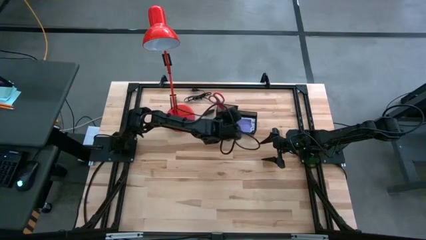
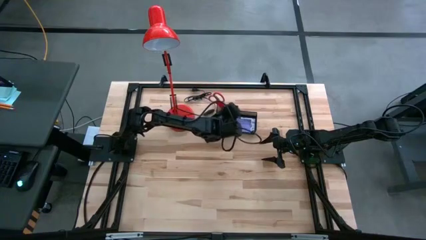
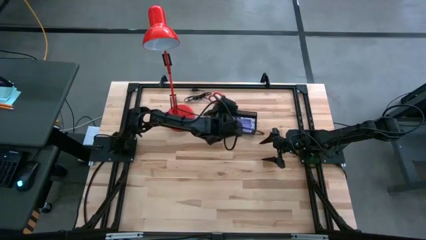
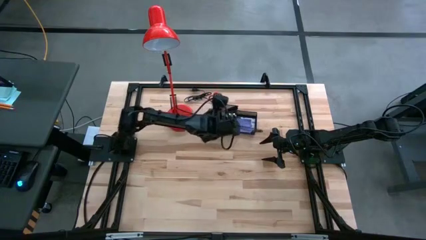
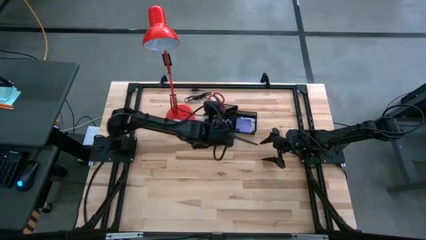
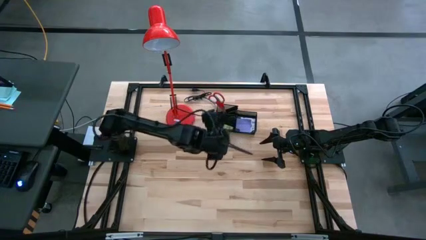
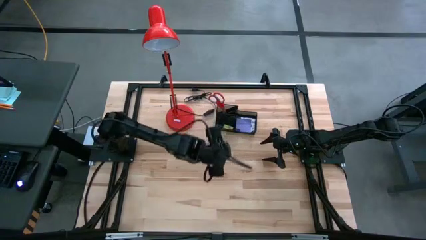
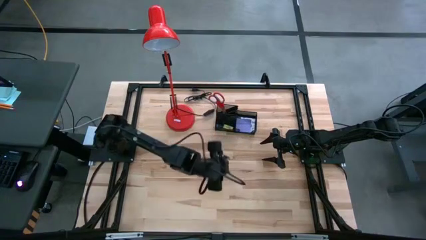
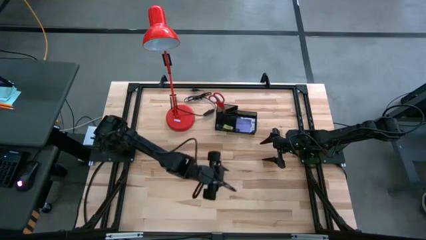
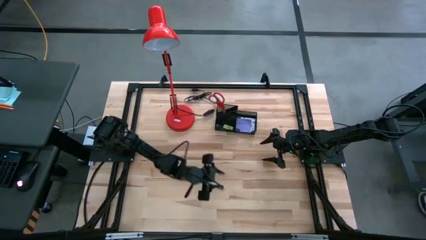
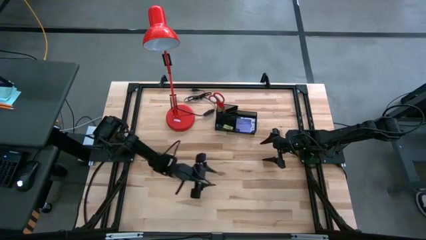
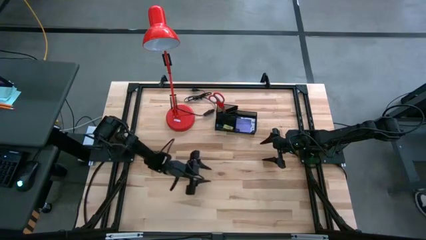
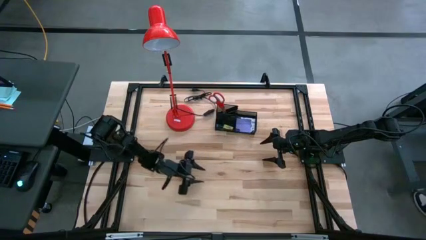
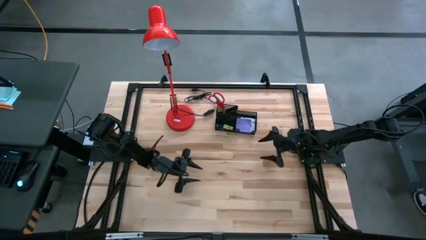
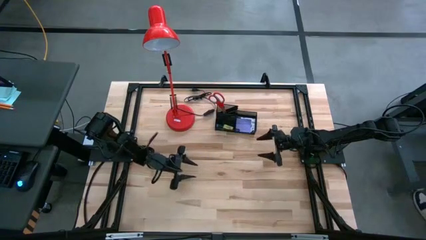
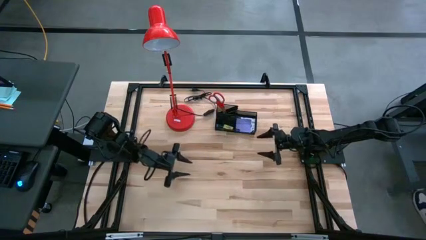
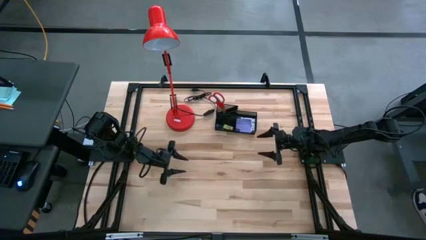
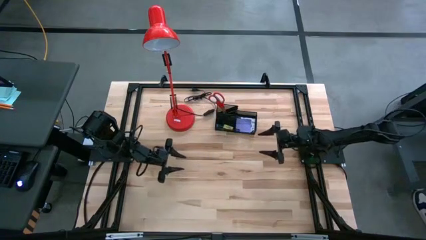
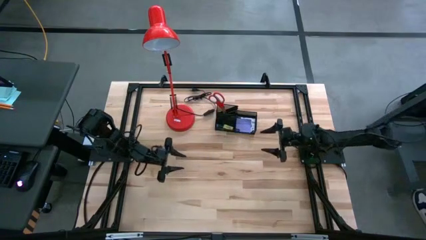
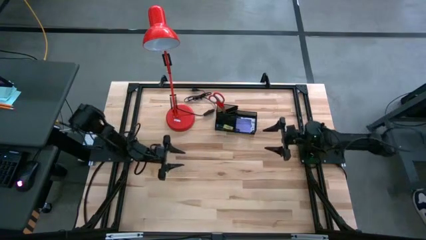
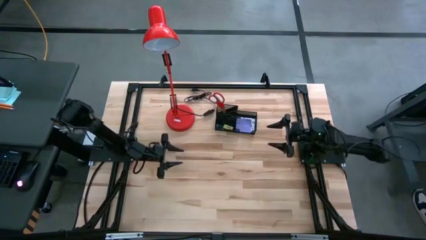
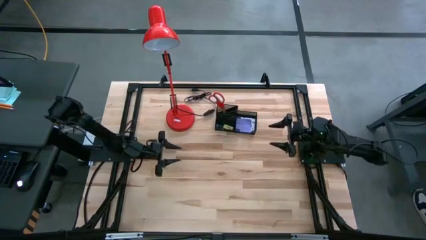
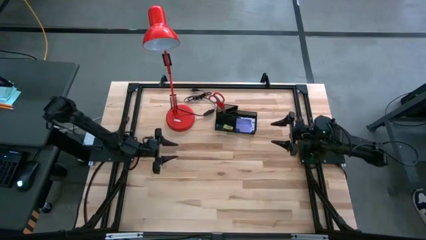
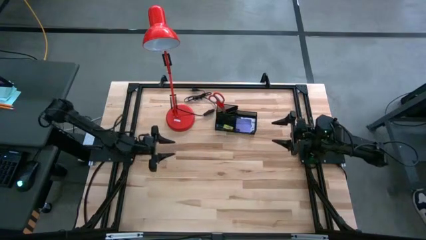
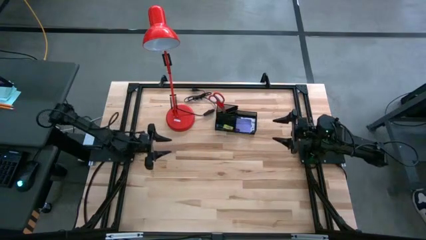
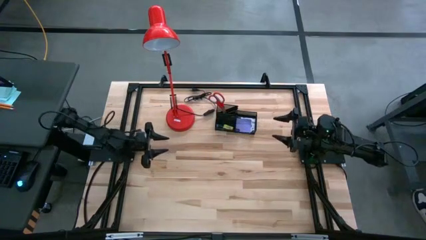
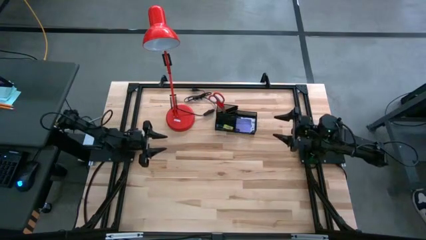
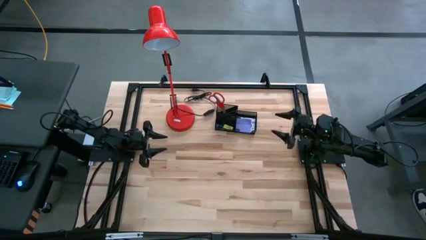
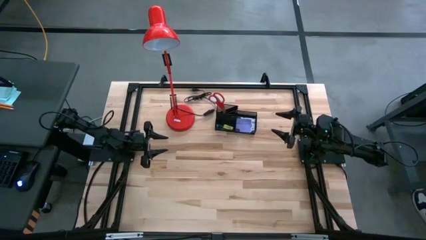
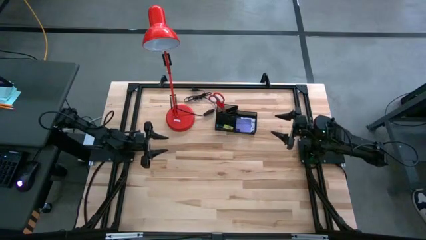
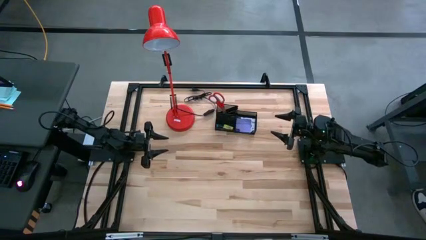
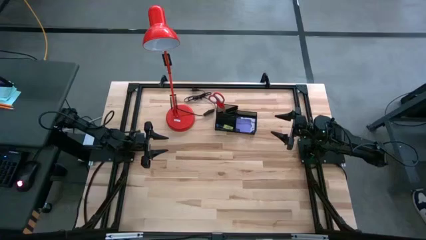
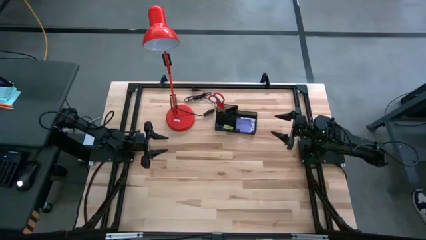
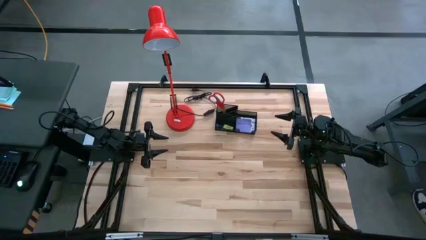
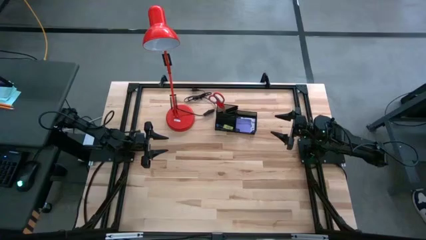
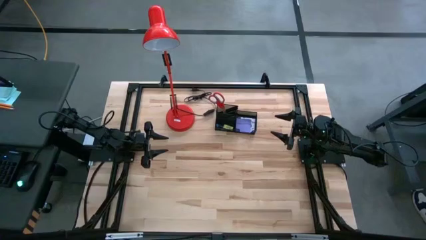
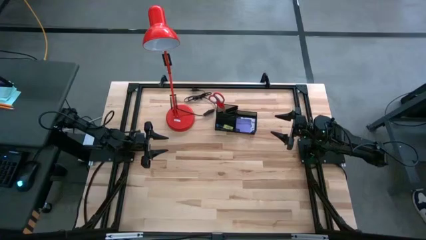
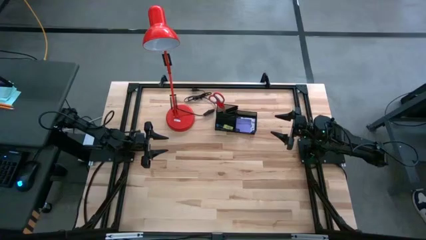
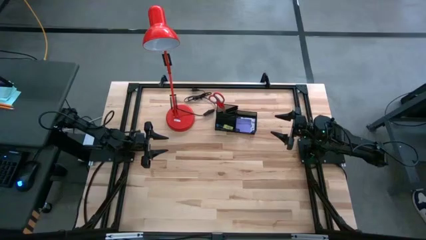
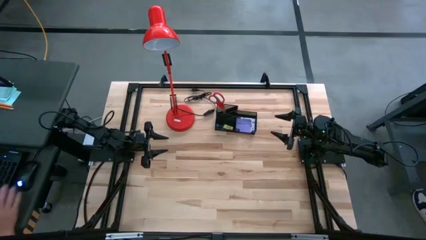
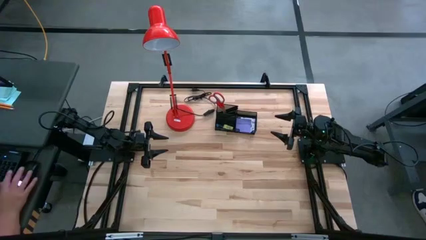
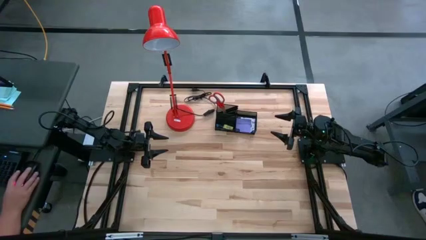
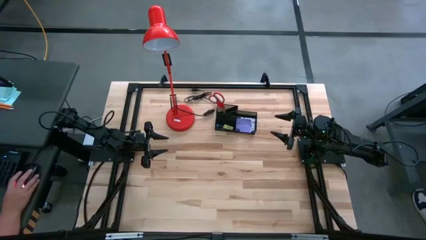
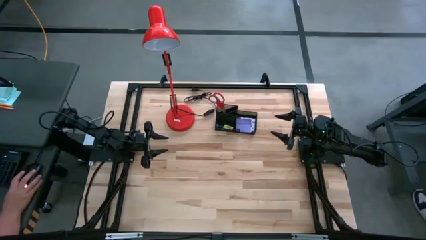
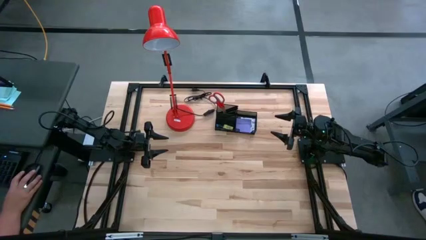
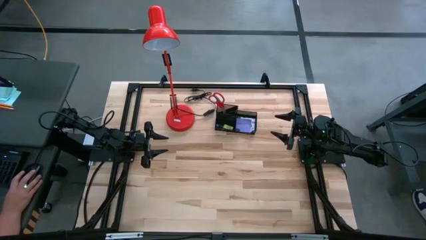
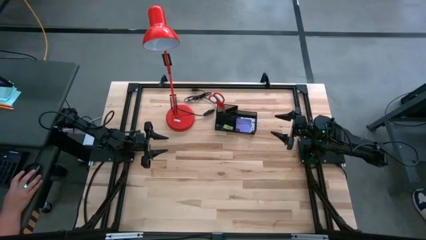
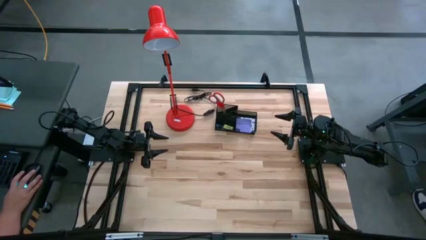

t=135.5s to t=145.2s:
Task: Pick and place office supplies into organizer
Return to Home Position
